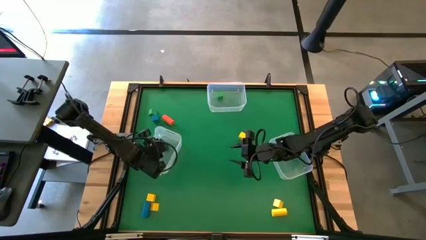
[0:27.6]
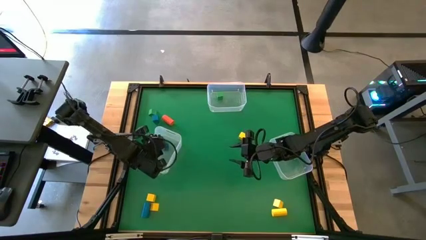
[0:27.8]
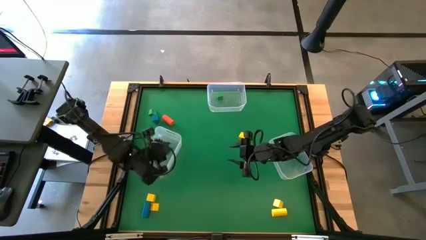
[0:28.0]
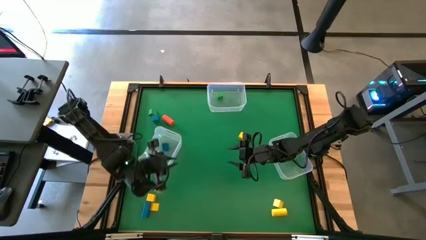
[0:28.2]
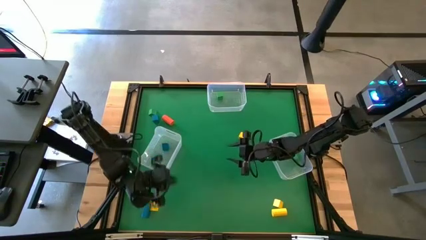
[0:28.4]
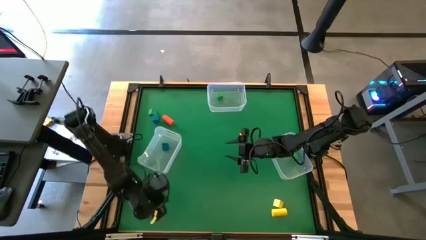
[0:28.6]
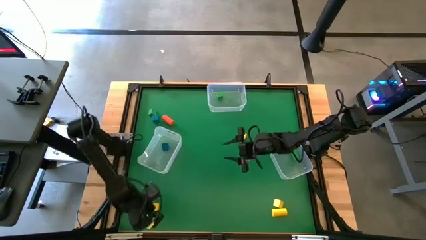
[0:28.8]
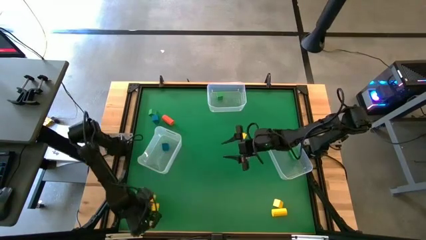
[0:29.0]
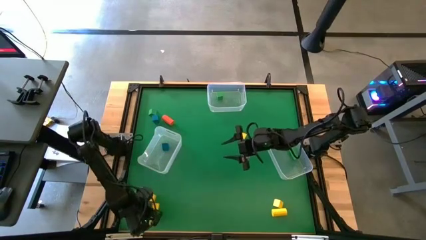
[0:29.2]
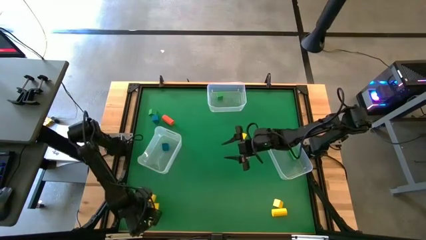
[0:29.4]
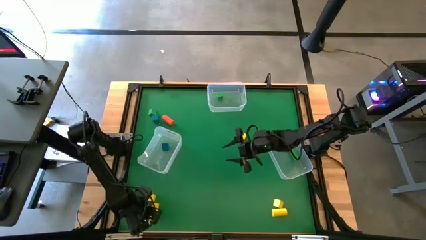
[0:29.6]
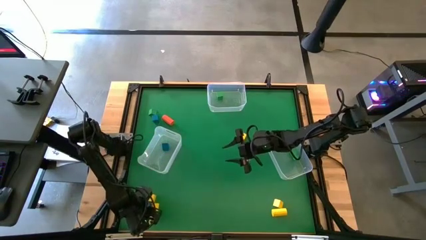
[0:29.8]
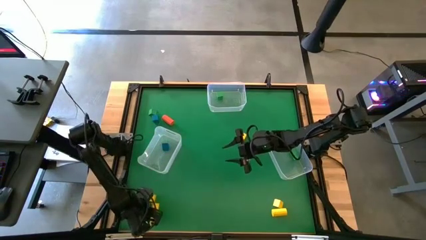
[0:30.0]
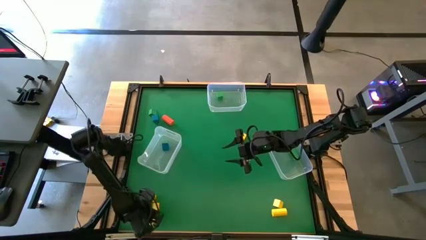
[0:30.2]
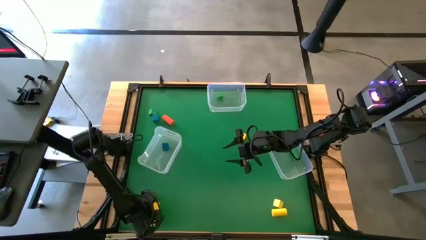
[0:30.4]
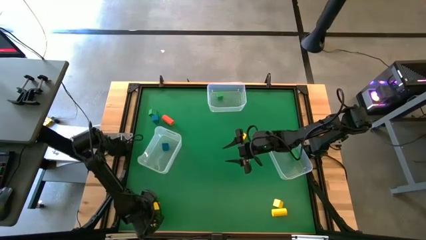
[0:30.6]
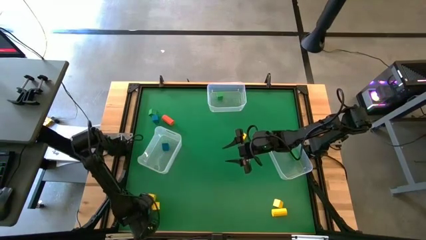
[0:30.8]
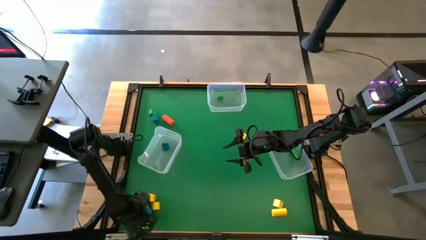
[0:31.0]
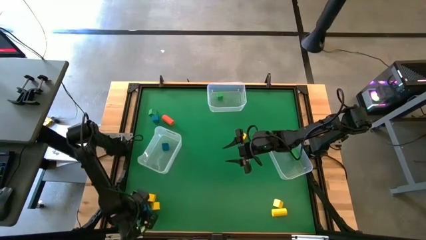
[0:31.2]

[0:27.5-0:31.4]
Task: Sort blocks by size
Put the blue cylindrical block into the bottom right transparent bin

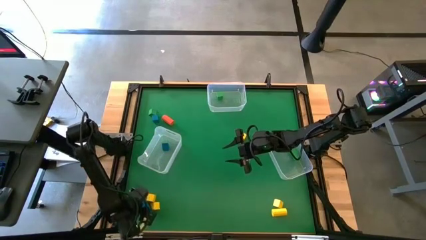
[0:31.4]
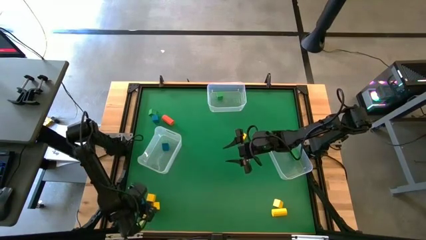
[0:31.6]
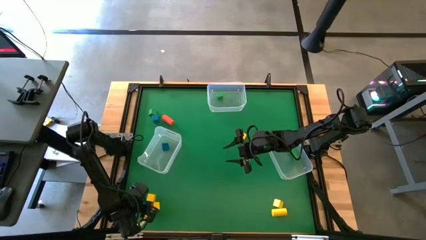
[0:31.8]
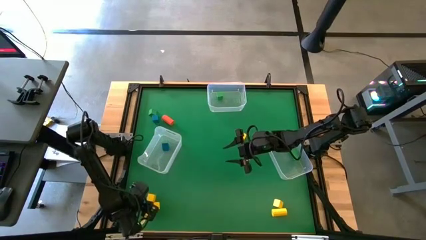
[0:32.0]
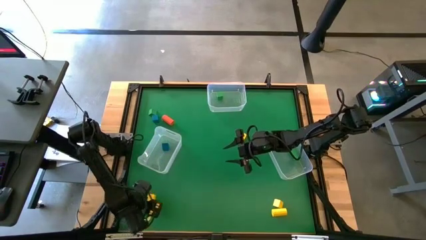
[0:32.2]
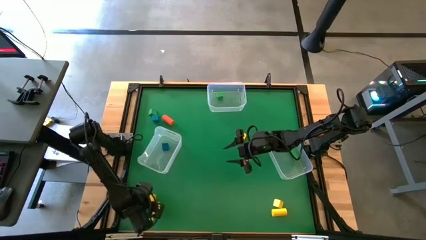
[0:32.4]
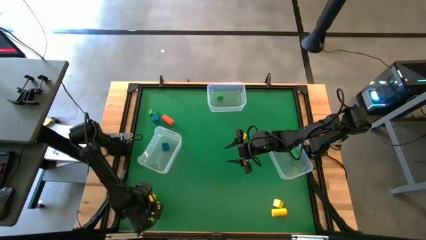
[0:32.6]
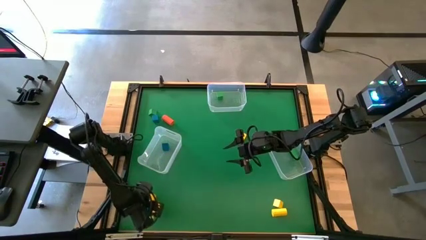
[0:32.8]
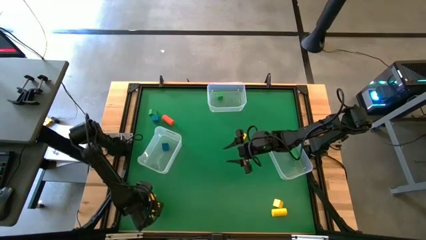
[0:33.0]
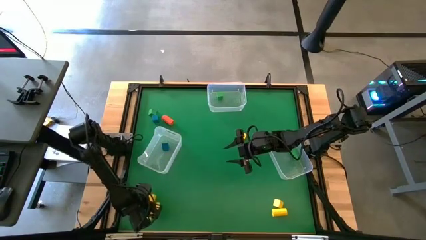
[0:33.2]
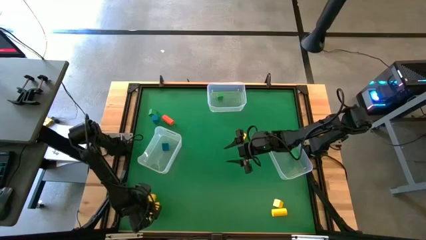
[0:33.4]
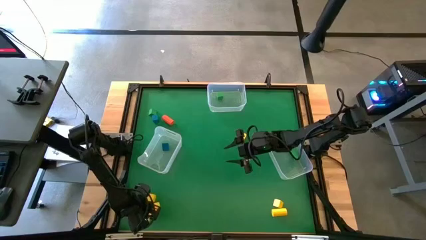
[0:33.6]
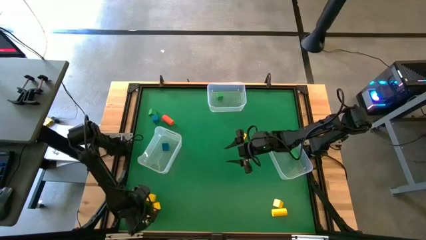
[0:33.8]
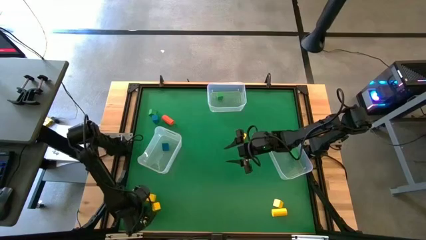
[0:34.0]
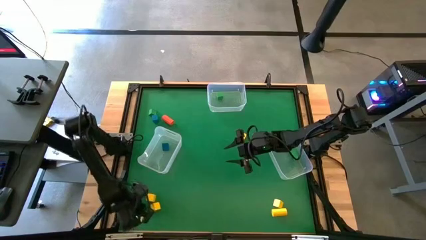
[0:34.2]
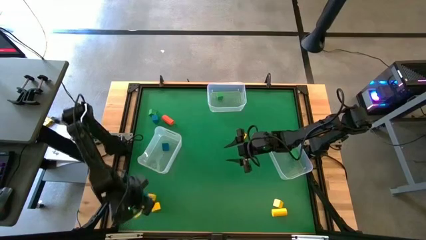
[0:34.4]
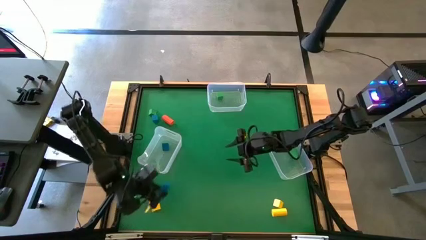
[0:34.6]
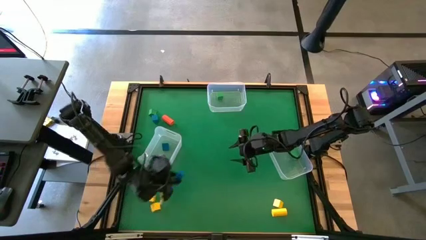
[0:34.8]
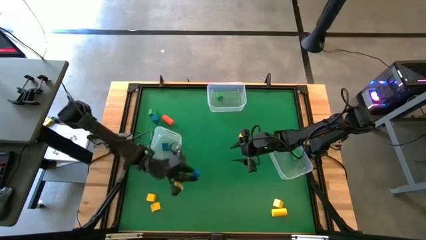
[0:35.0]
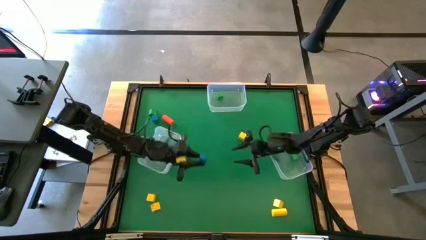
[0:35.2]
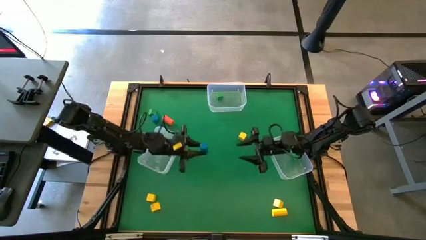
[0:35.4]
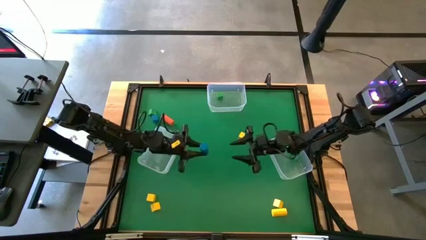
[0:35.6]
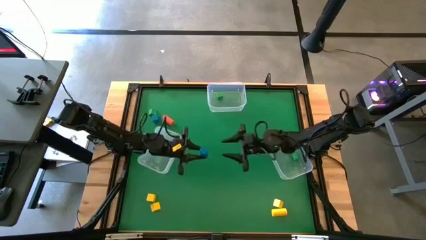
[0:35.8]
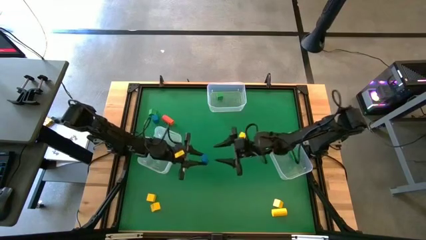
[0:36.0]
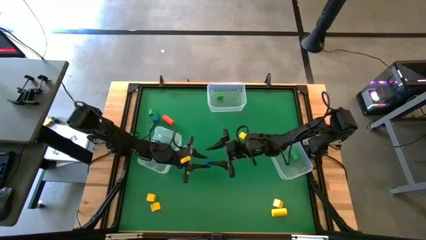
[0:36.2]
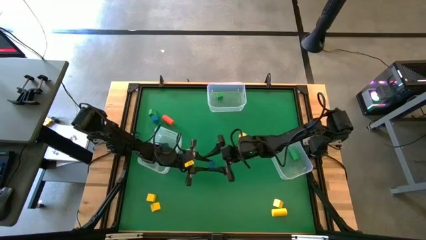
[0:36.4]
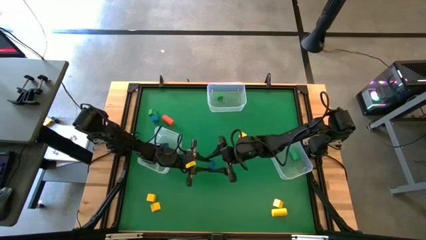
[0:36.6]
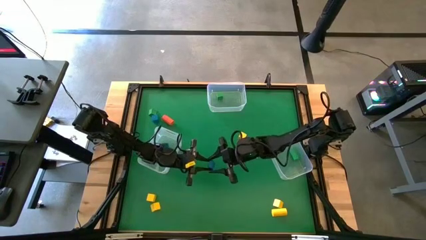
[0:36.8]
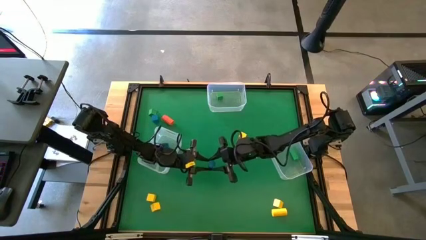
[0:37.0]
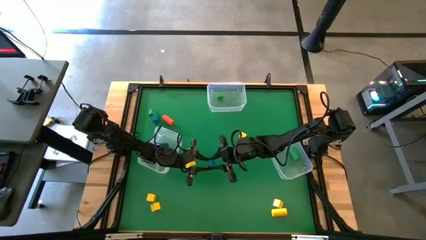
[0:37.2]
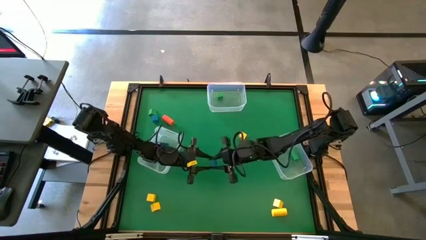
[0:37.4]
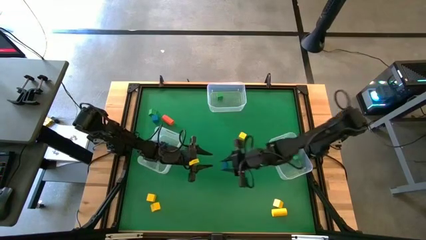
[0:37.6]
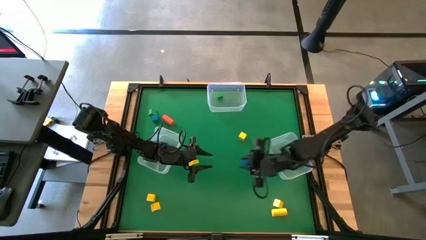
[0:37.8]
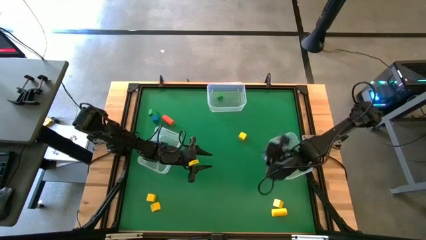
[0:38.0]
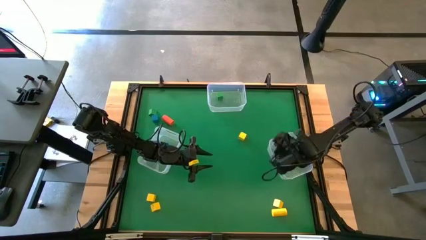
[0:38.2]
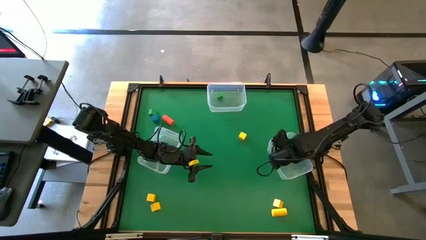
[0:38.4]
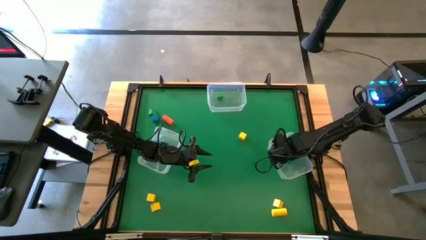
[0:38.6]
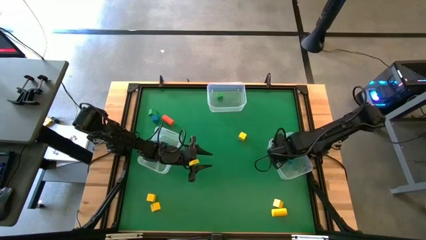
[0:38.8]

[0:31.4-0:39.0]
Put the blue cylindrical block into the bottom right transparent bin

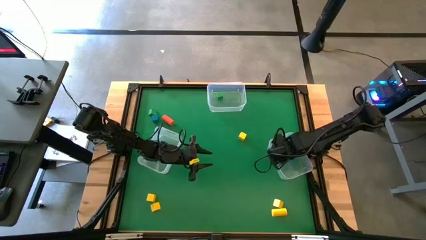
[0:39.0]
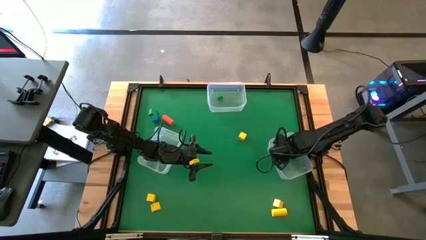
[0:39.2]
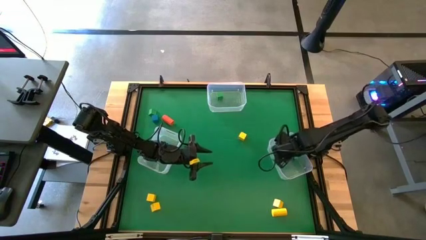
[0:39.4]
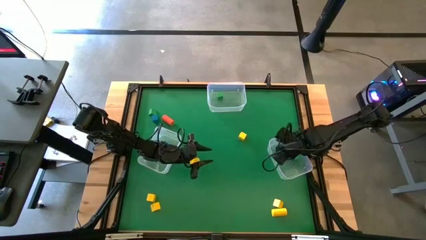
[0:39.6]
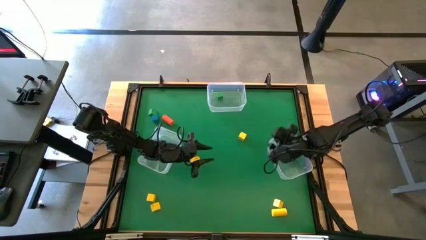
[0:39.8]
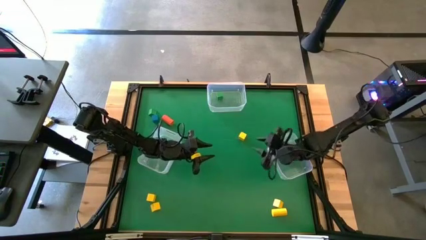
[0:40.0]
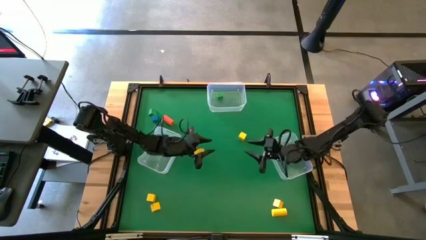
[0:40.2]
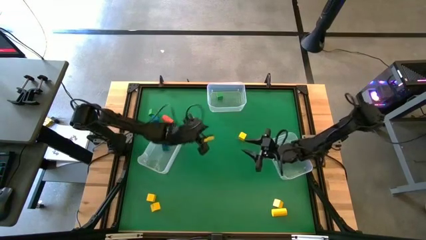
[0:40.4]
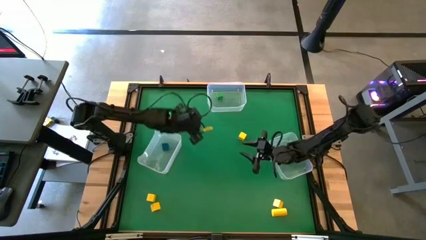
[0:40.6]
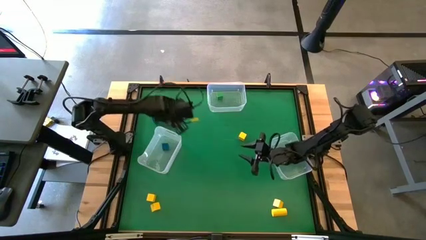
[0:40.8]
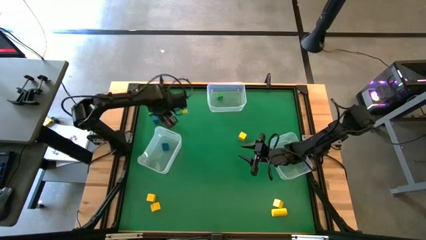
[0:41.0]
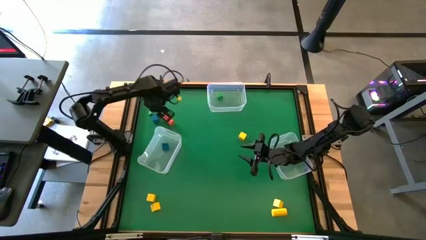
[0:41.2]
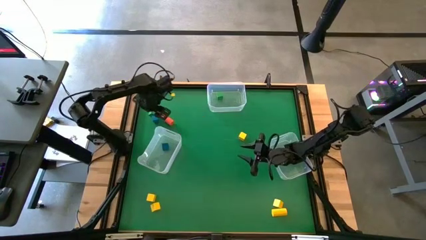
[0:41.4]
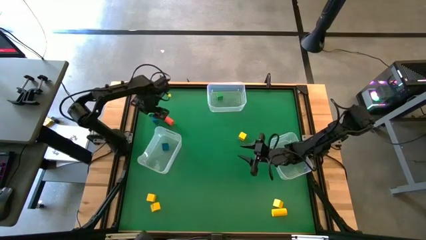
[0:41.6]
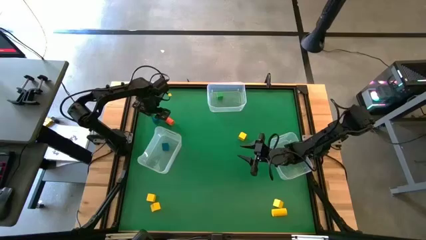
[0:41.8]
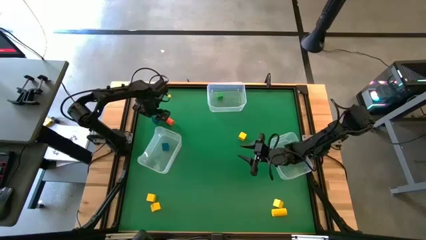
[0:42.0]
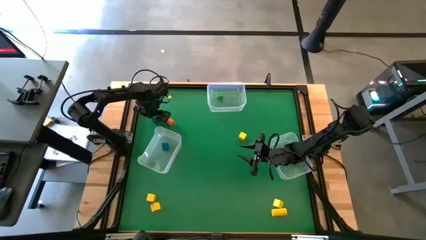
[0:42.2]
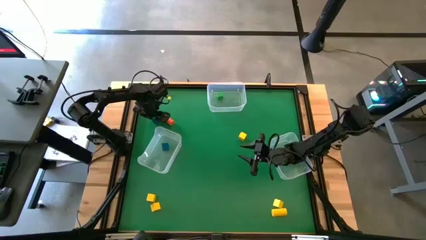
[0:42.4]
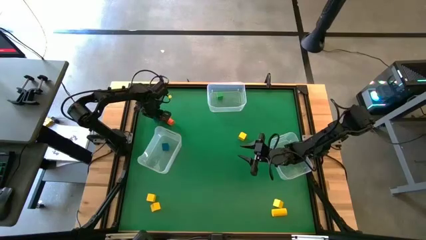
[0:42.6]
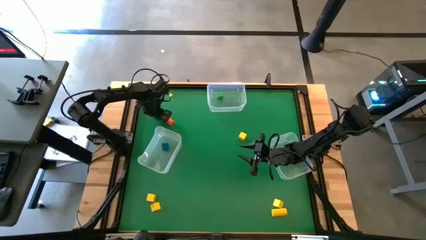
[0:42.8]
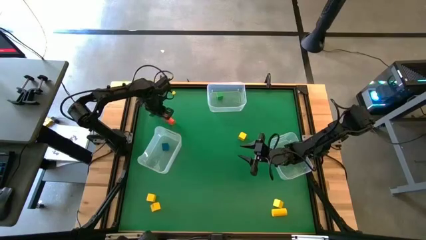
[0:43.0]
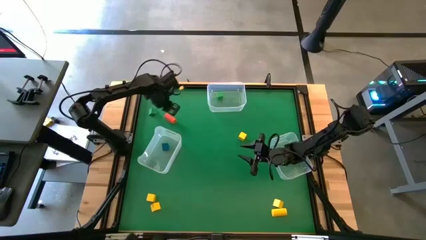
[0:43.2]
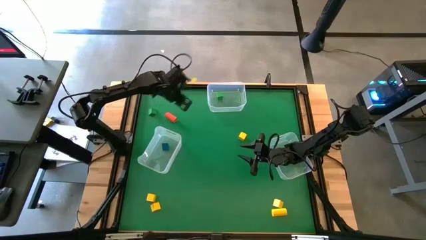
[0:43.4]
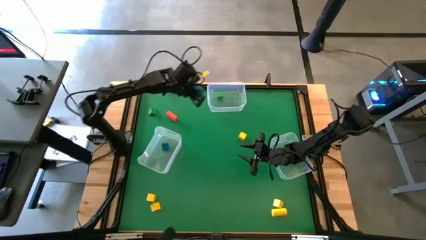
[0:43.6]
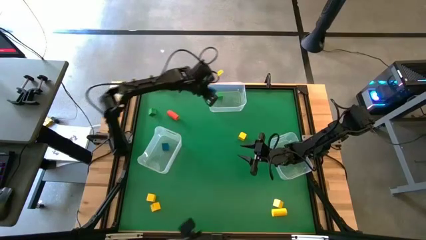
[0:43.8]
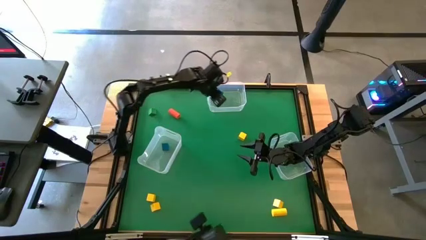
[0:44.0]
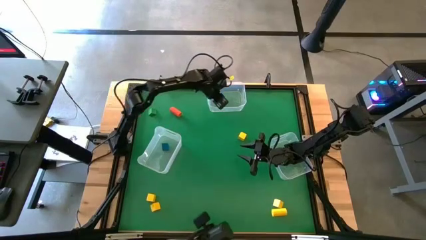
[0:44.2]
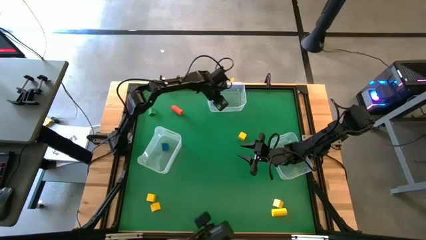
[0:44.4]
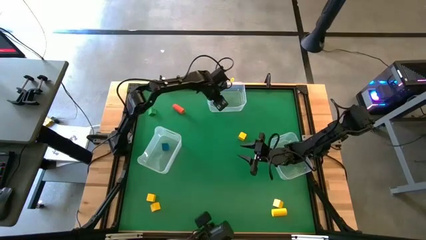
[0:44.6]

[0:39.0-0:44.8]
Put the blue cube block into the top transparent bin
